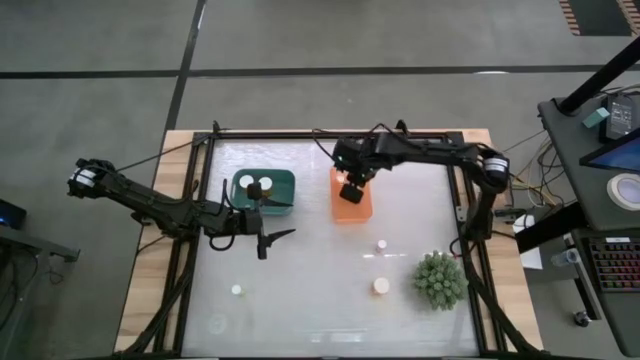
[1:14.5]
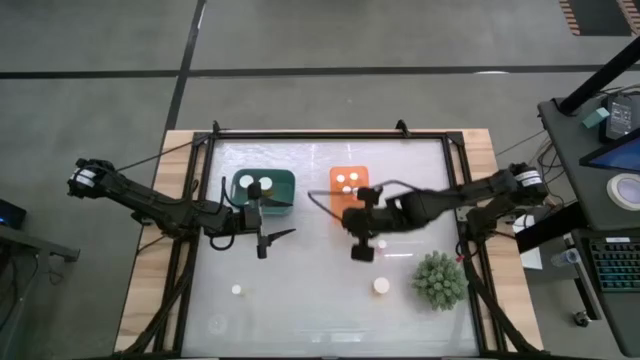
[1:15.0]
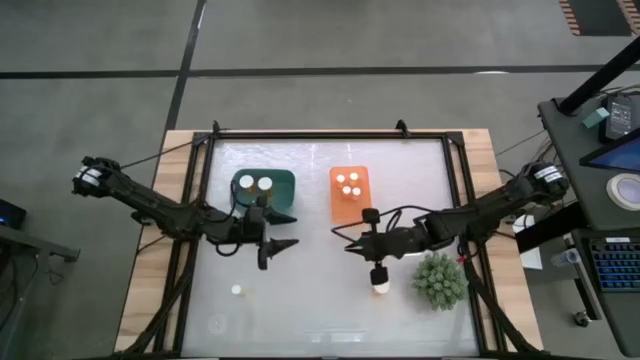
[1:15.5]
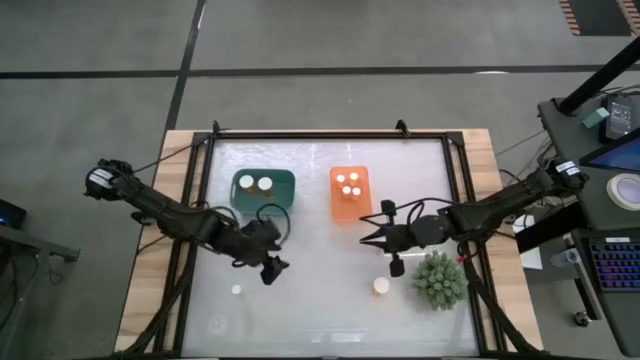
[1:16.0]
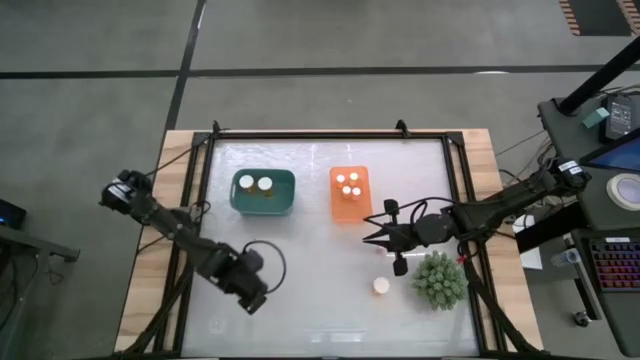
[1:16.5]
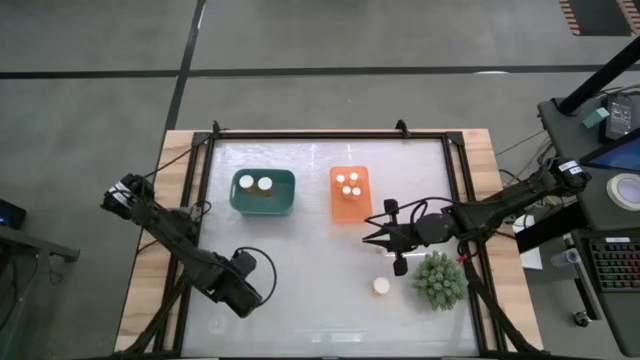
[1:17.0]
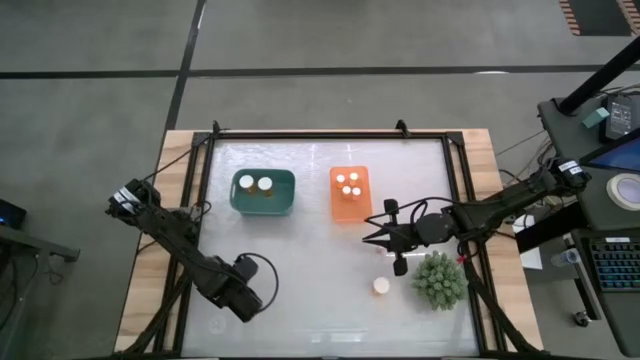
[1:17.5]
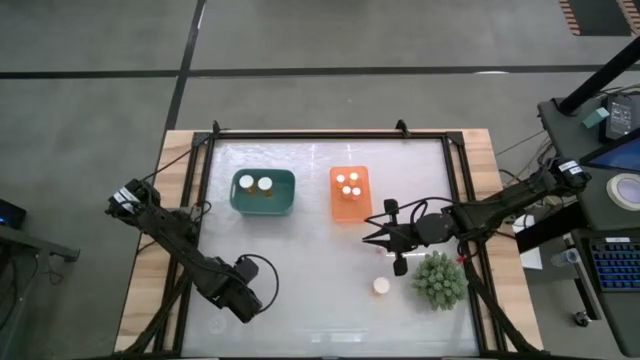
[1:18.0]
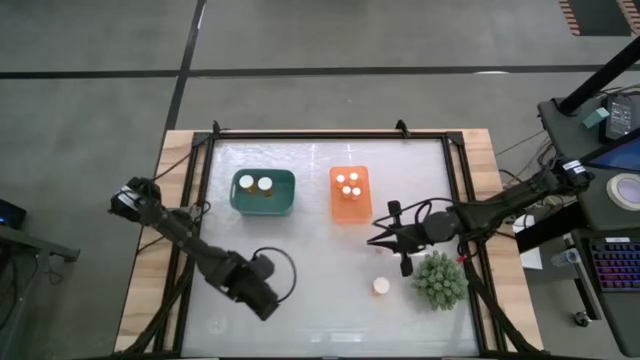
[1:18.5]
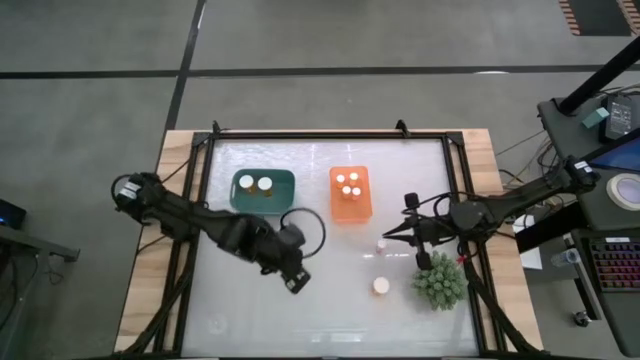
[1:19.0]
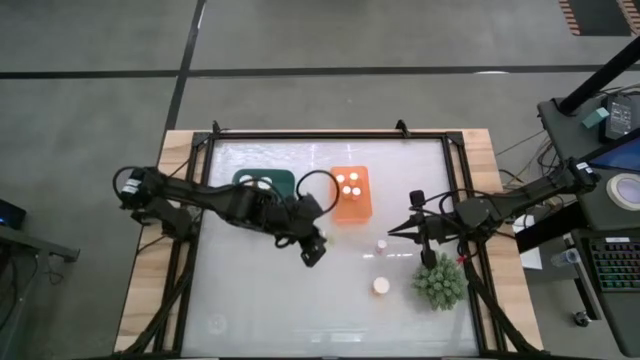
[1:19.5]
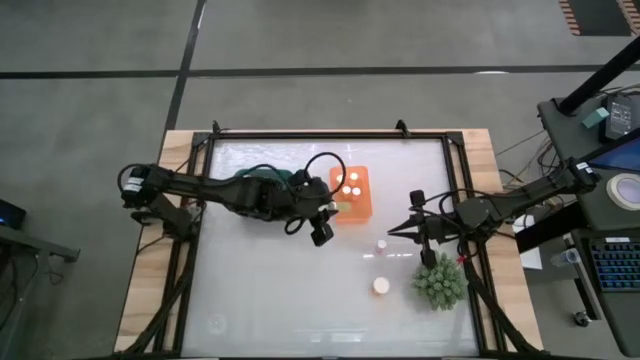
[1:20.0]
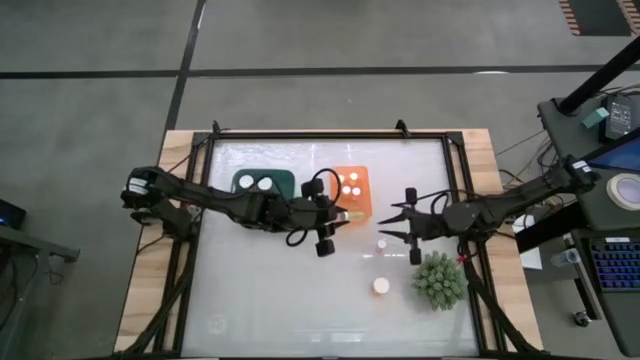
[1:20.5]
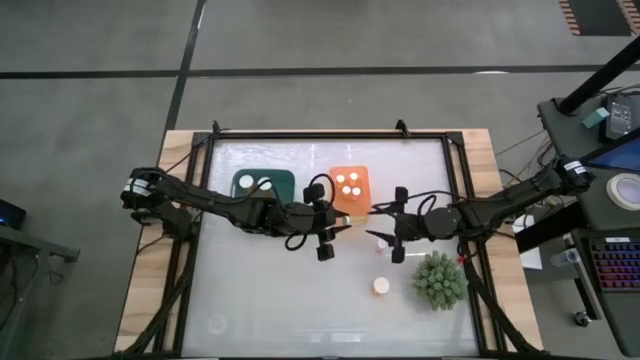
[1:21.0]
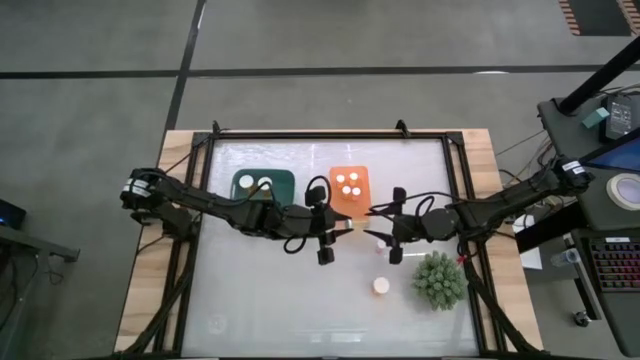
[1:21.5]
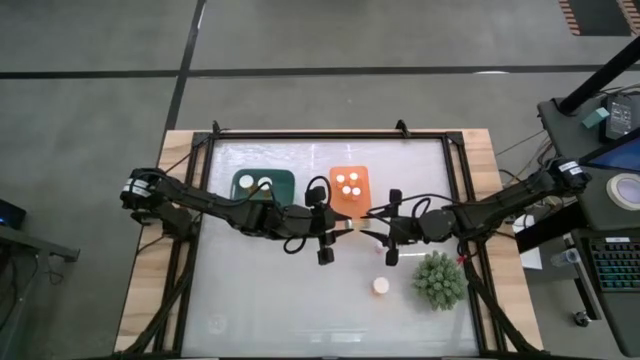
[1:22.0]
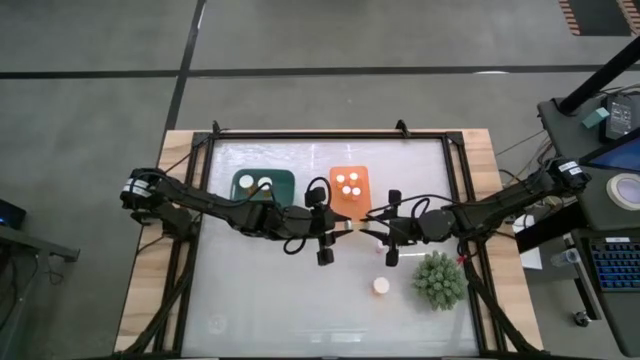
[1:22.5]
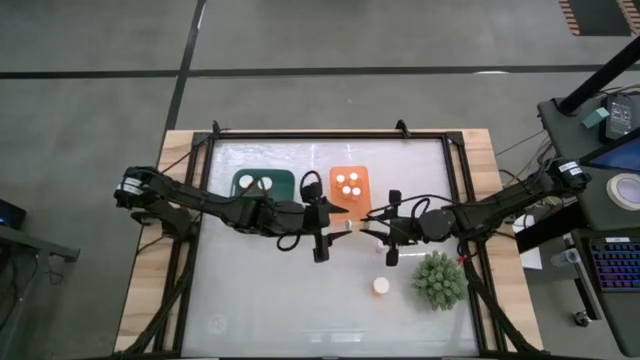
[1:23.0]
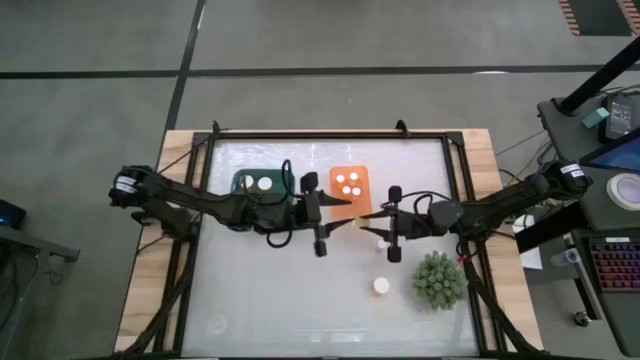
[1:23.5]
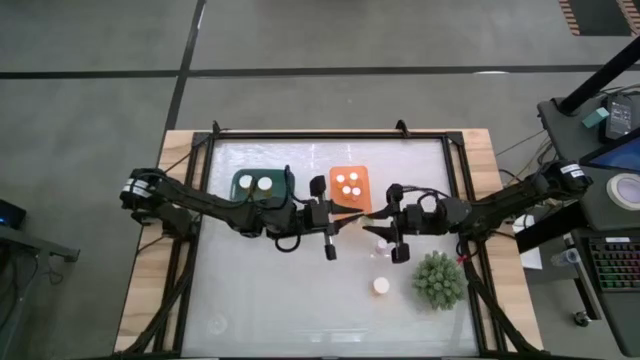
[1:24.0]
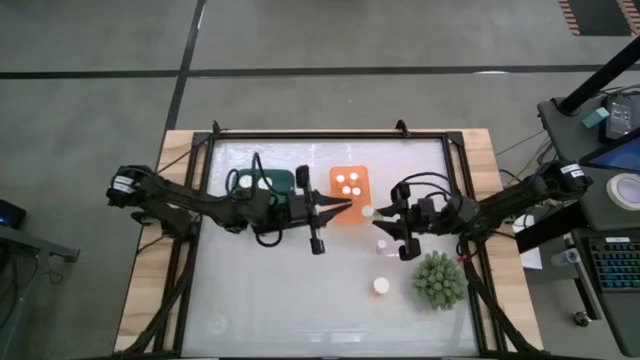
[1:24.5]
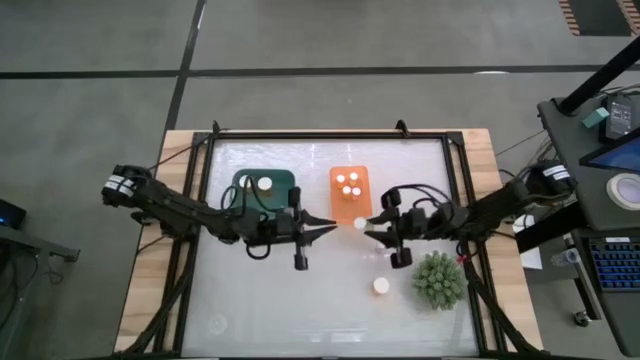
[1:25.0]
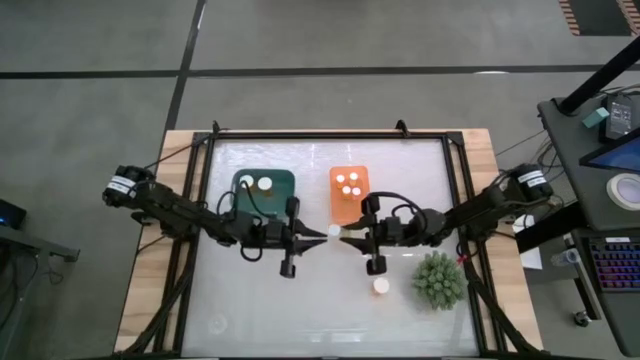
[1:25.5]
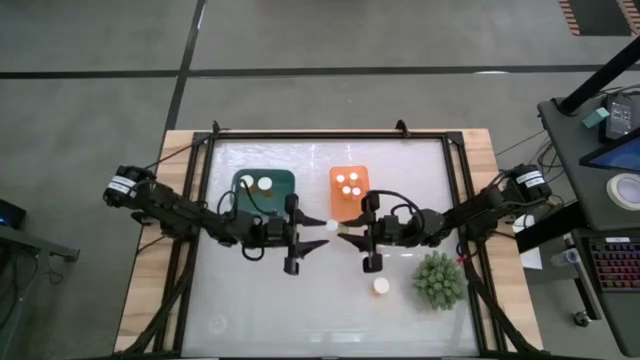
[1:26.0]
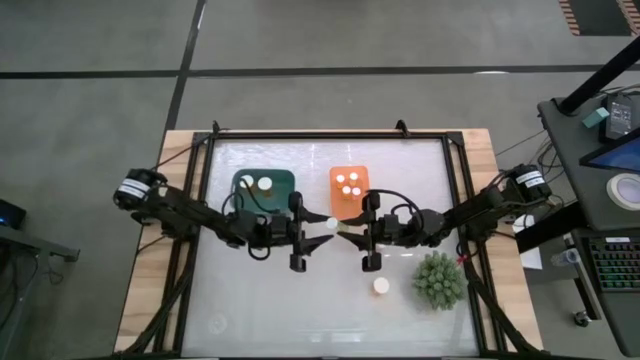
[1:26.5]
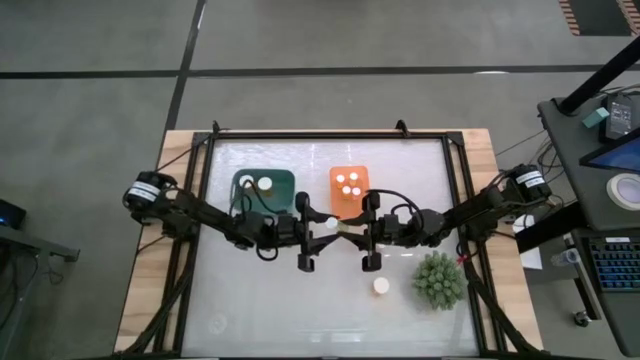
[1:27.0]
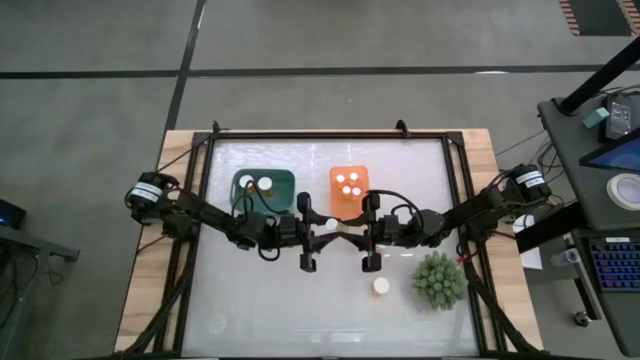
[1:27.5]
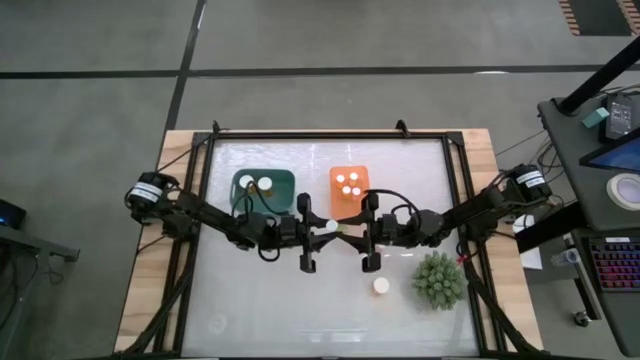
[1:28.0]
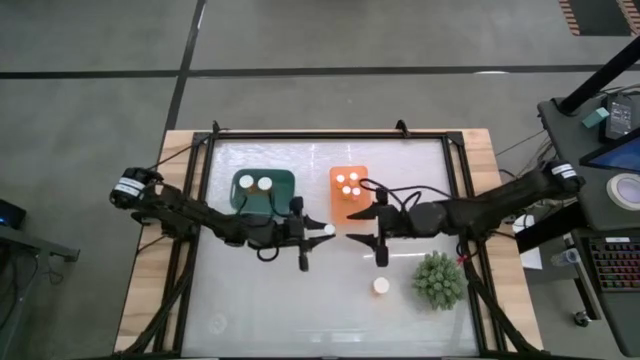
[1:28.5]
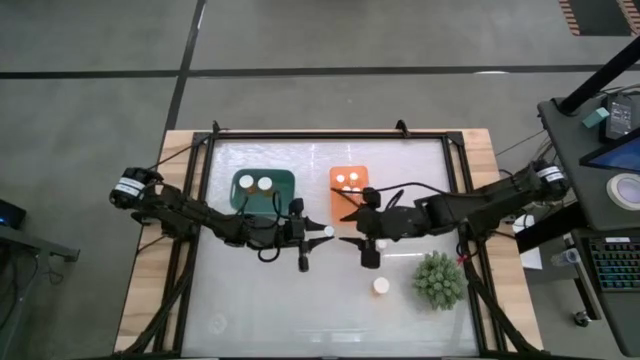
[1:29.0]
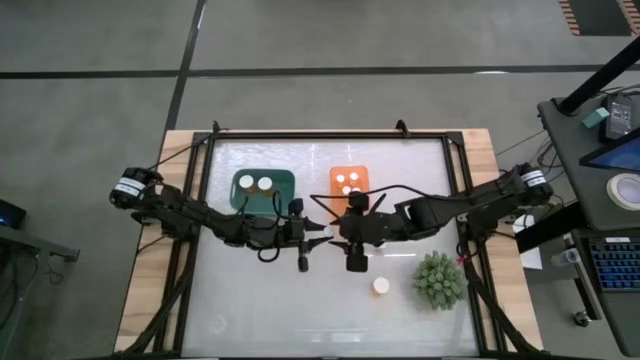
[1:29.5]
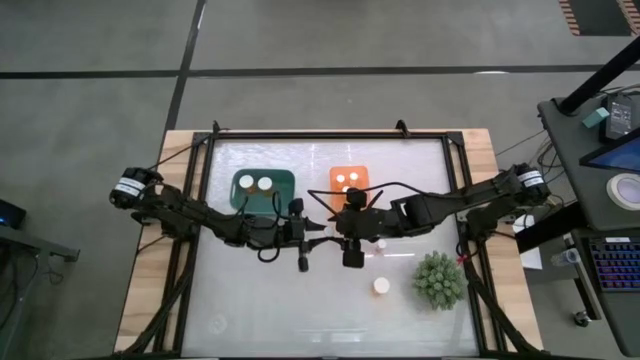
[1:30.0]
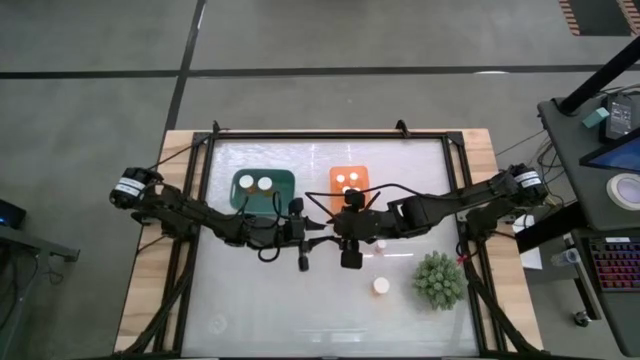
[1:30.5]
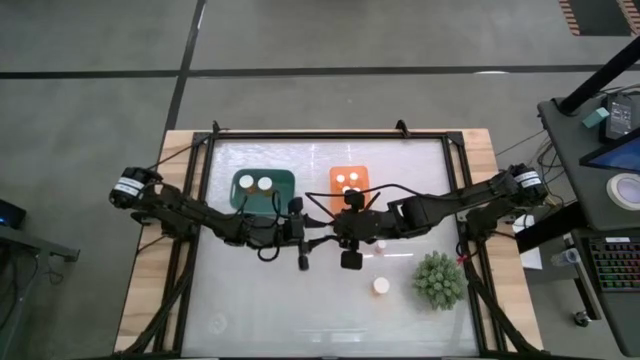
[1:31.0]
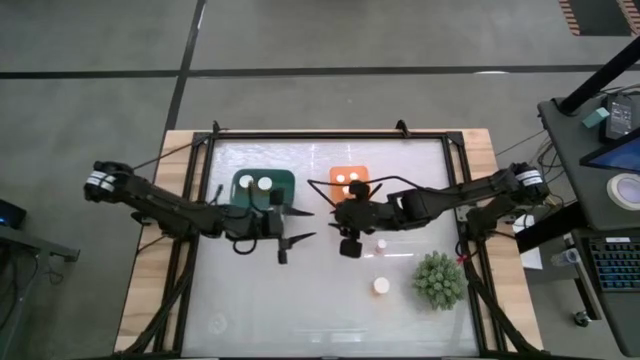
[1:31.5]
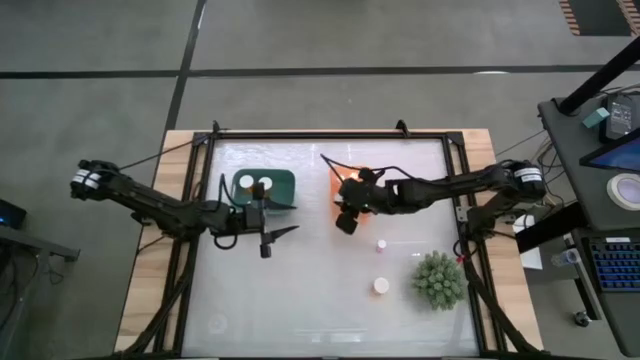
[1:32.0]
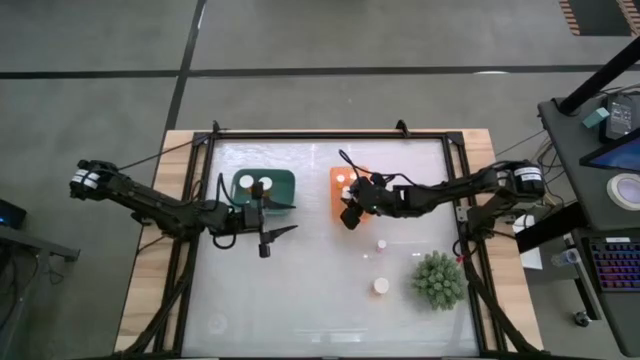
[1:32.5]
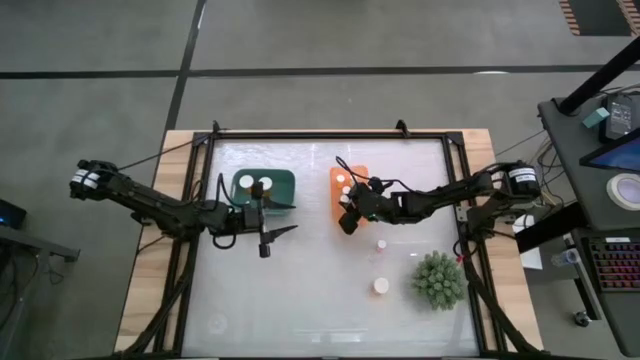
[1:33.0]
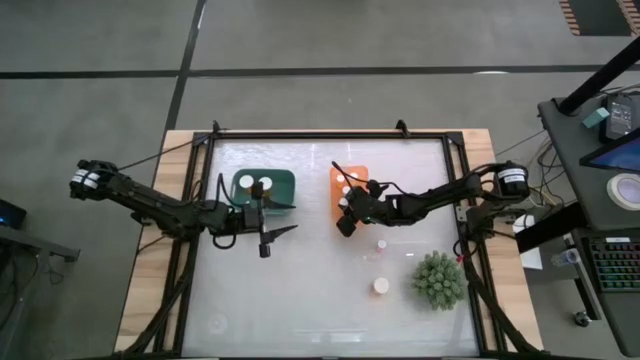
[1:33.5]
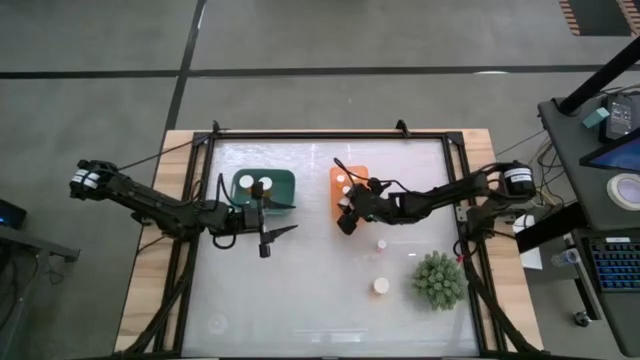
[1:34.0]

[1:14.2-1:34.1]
Task: Pick and place medicine bottles into bin by pill shape (circle, oval)
Put the small yellow pill bottle into the orange bin
